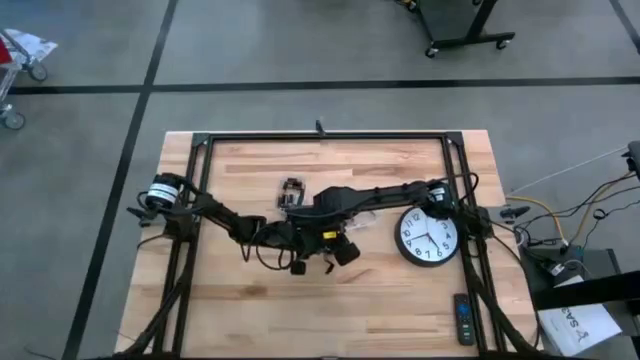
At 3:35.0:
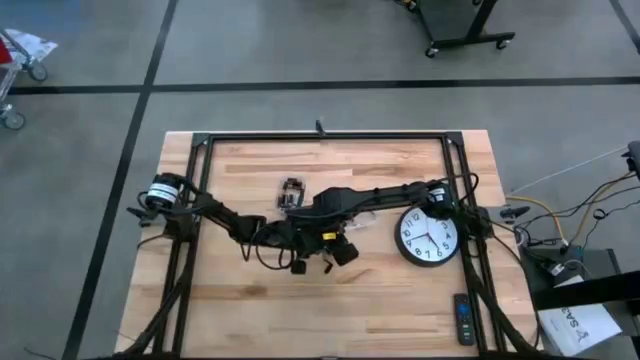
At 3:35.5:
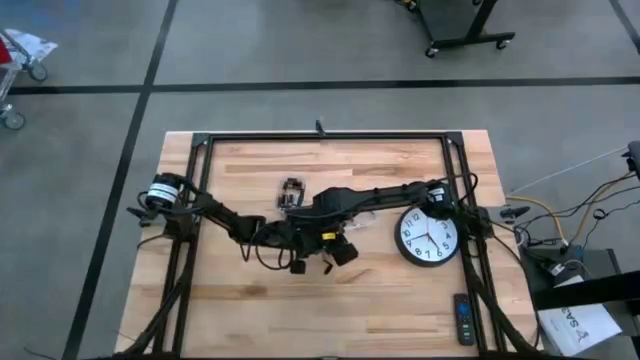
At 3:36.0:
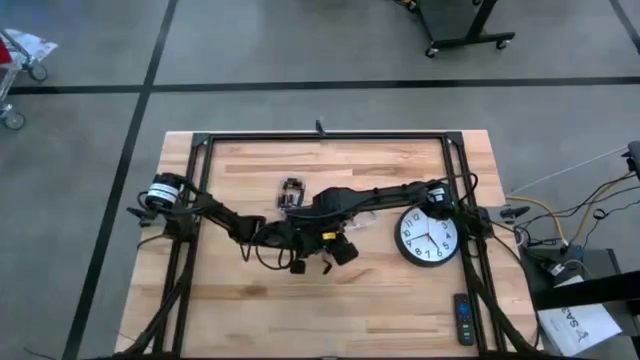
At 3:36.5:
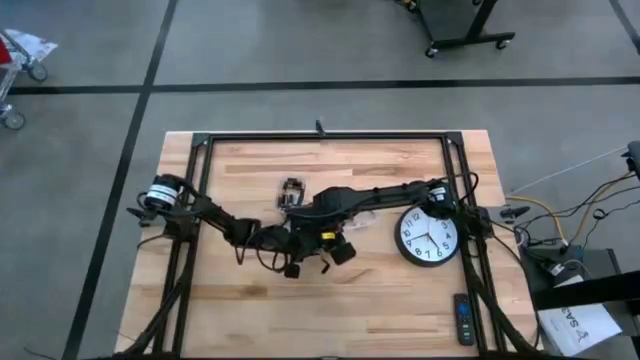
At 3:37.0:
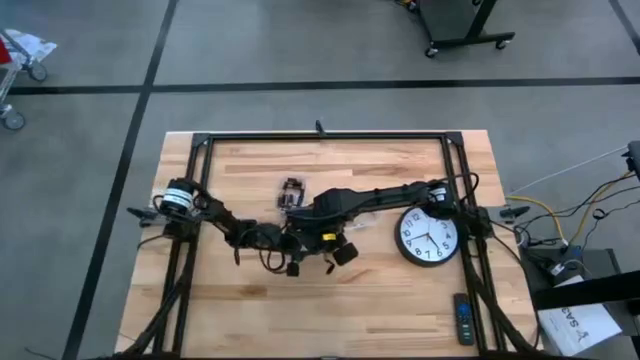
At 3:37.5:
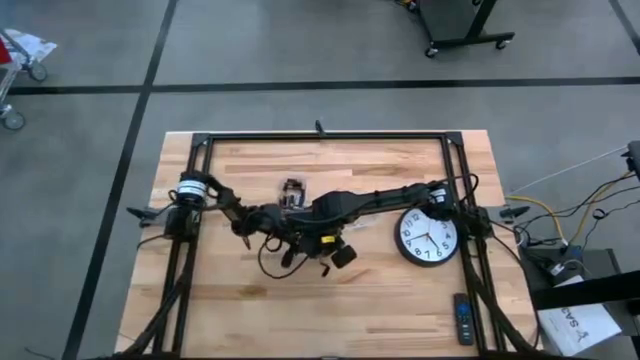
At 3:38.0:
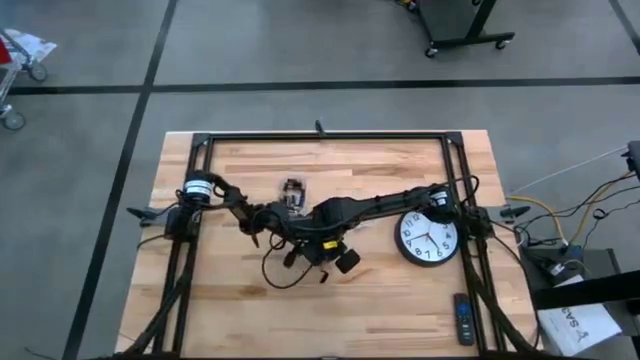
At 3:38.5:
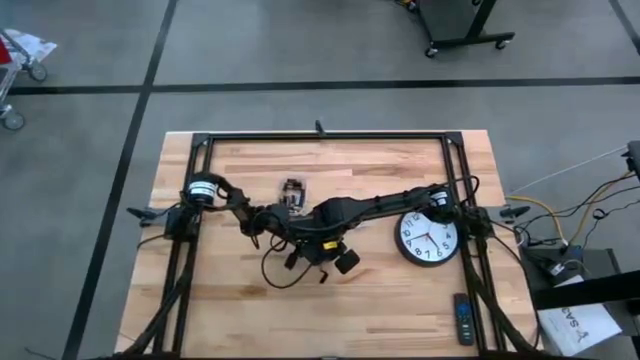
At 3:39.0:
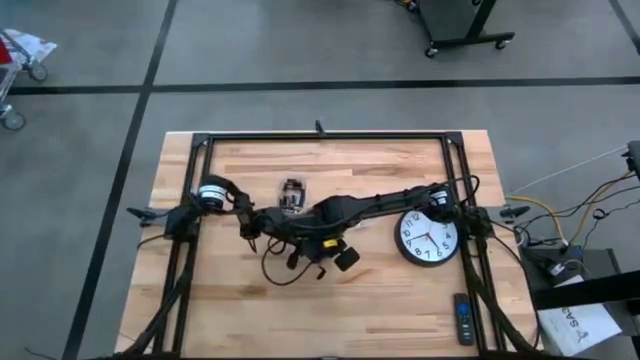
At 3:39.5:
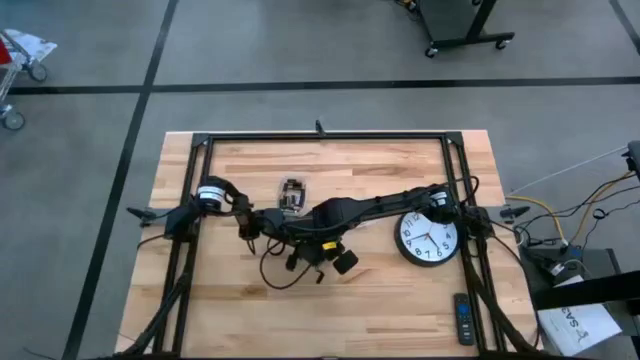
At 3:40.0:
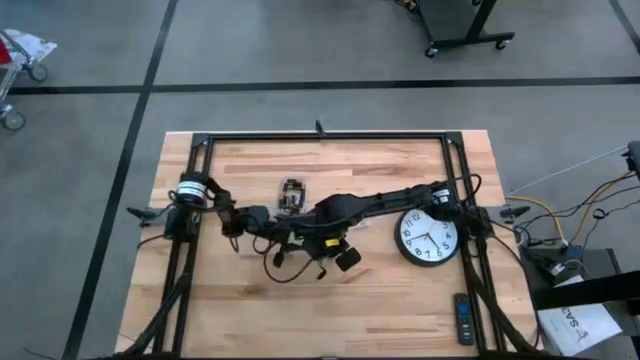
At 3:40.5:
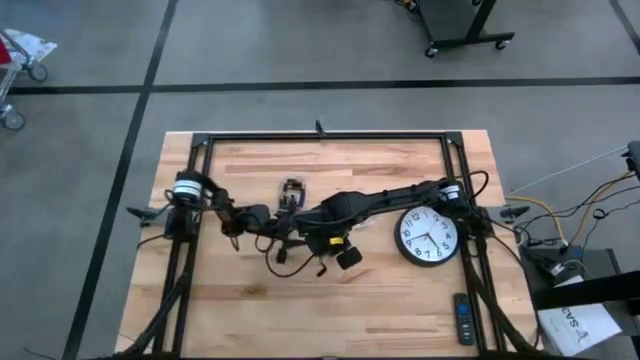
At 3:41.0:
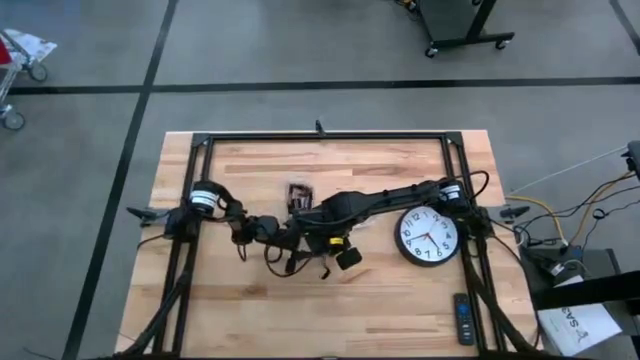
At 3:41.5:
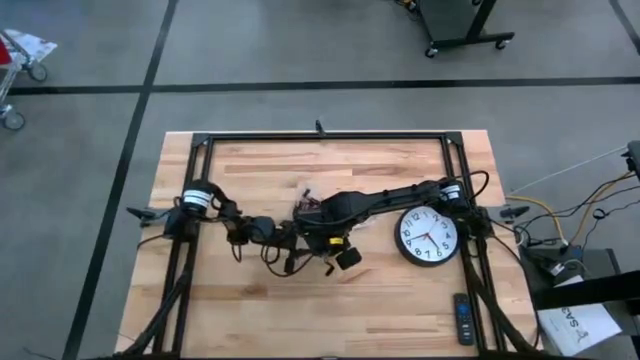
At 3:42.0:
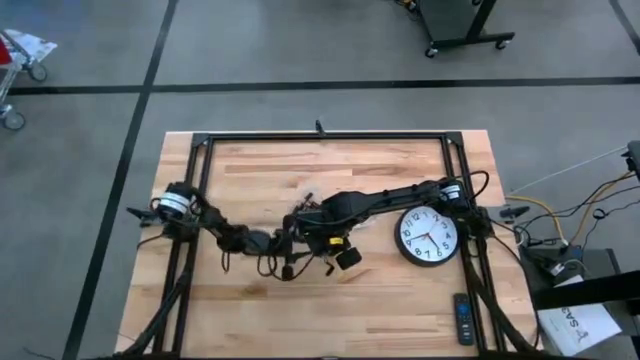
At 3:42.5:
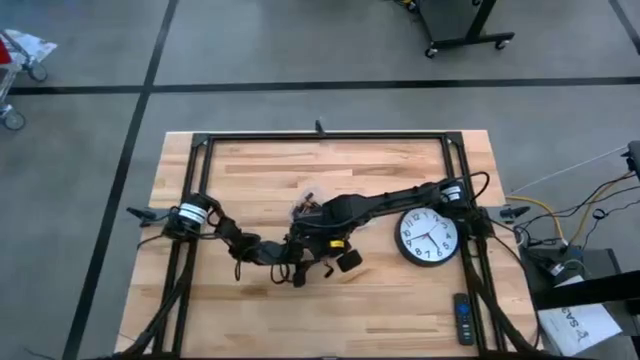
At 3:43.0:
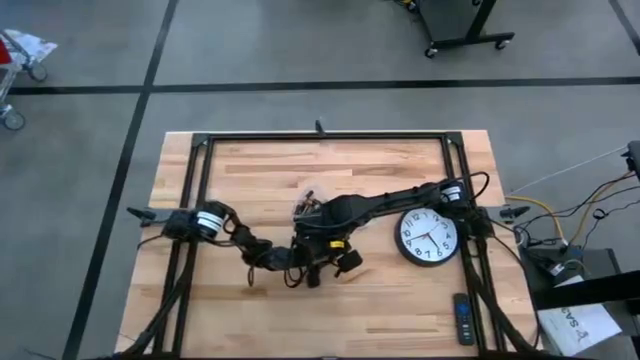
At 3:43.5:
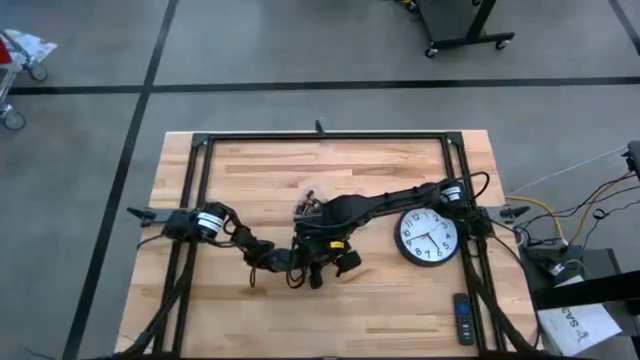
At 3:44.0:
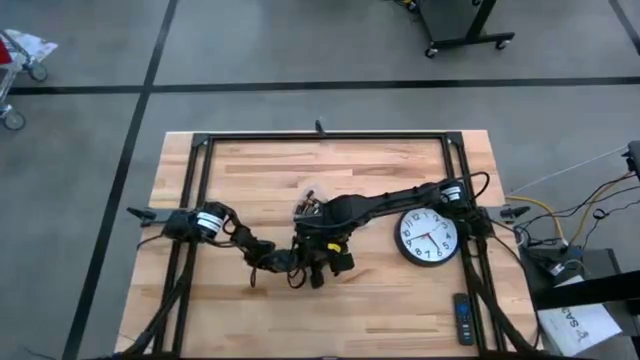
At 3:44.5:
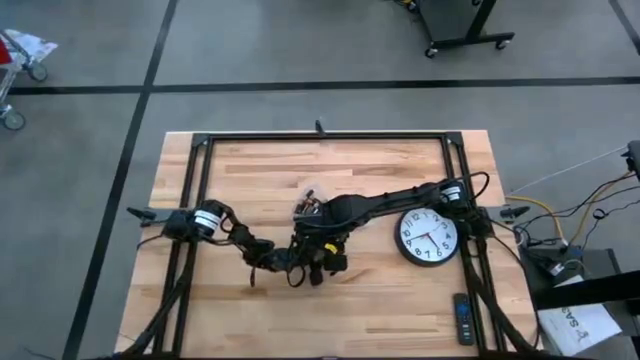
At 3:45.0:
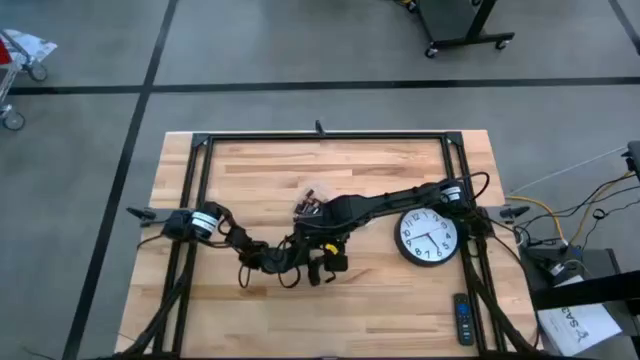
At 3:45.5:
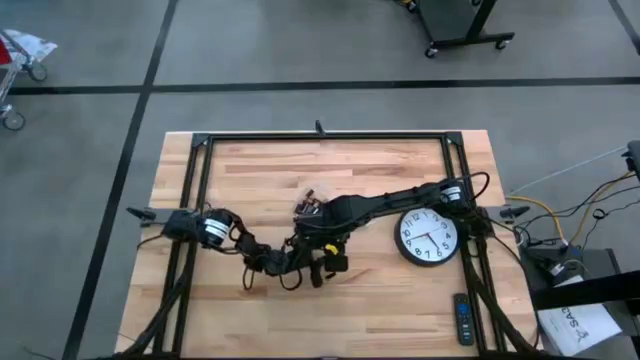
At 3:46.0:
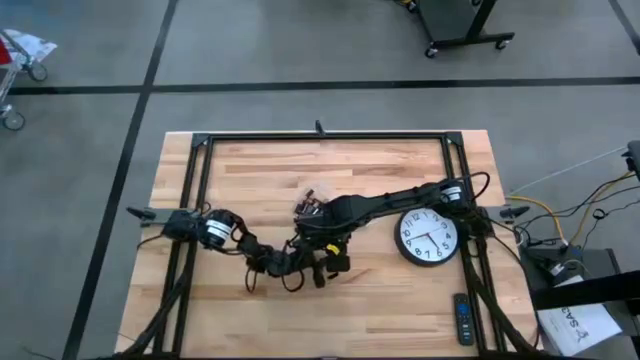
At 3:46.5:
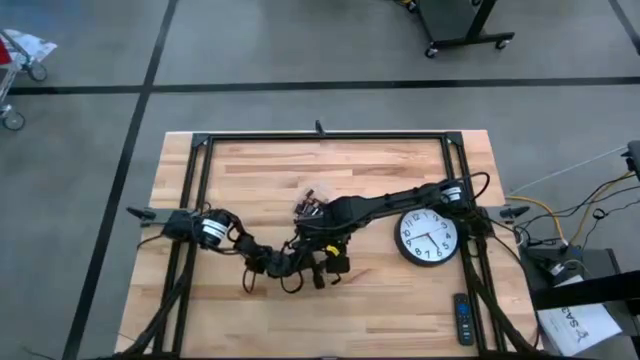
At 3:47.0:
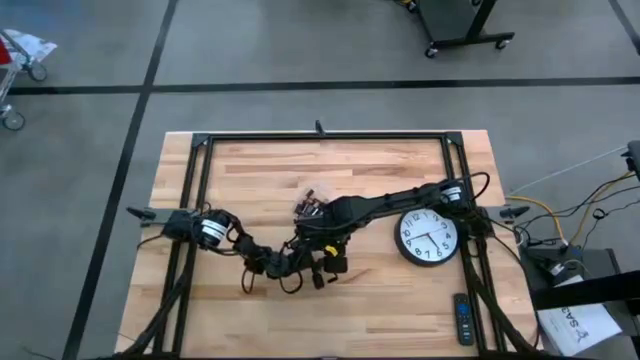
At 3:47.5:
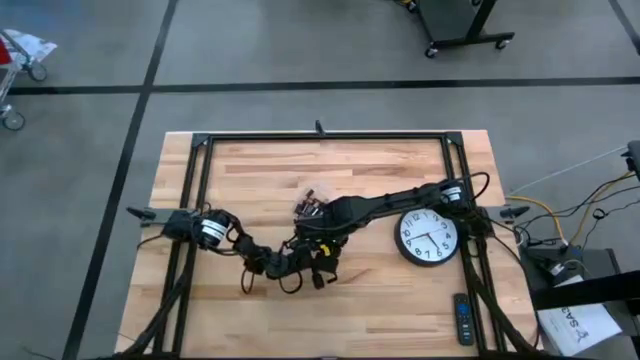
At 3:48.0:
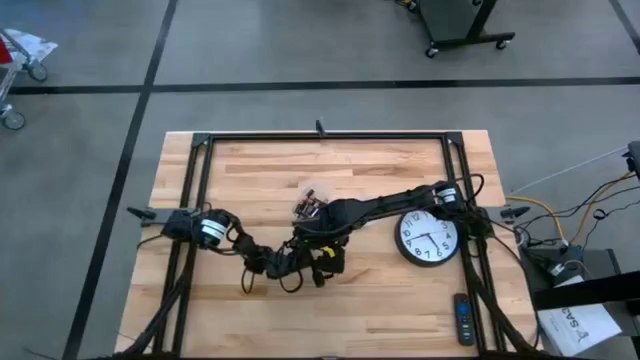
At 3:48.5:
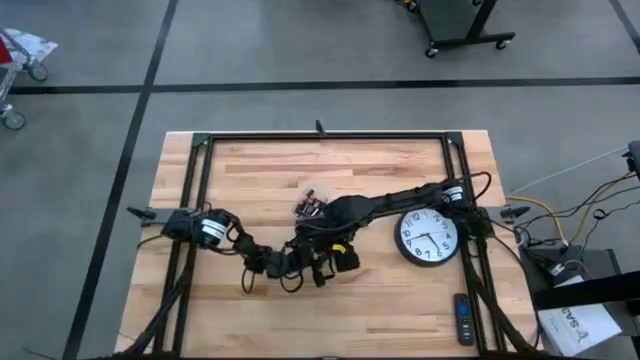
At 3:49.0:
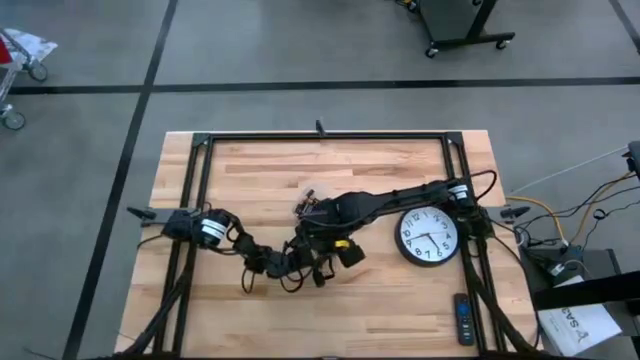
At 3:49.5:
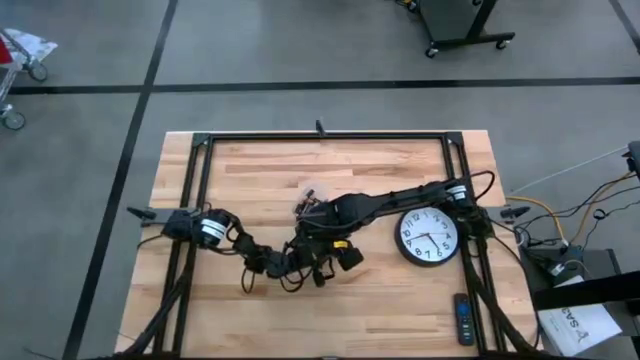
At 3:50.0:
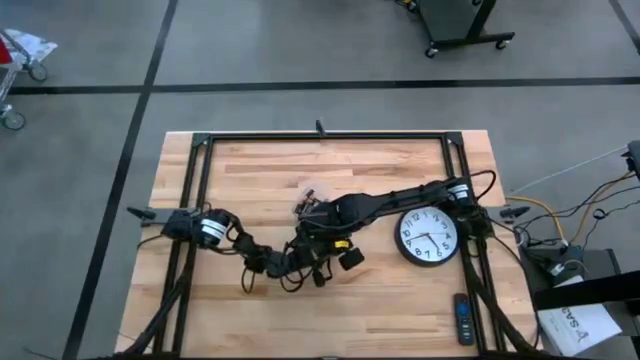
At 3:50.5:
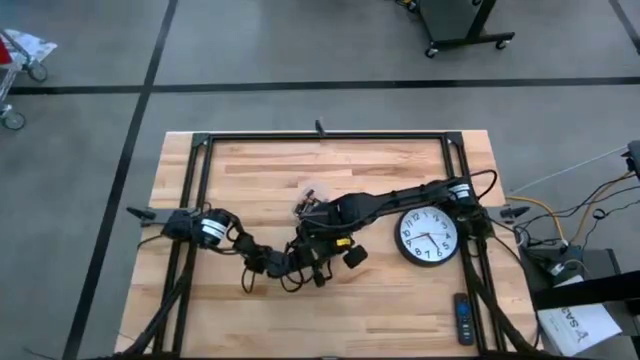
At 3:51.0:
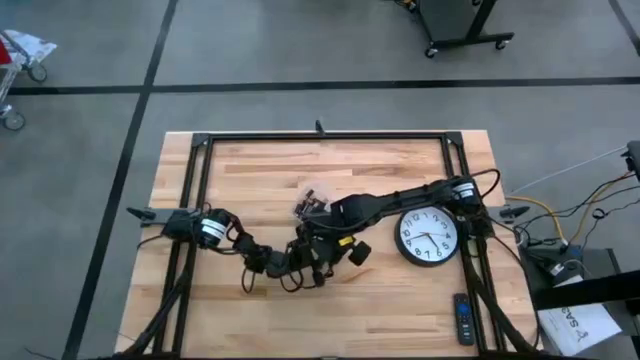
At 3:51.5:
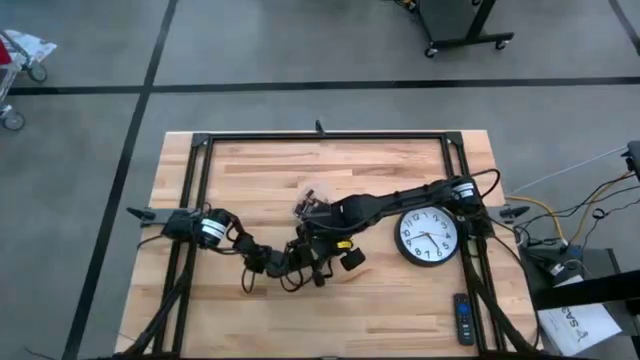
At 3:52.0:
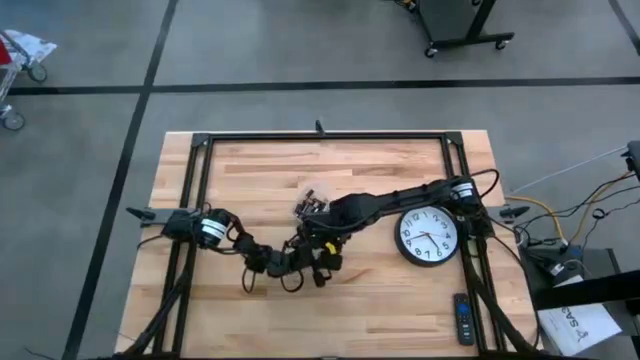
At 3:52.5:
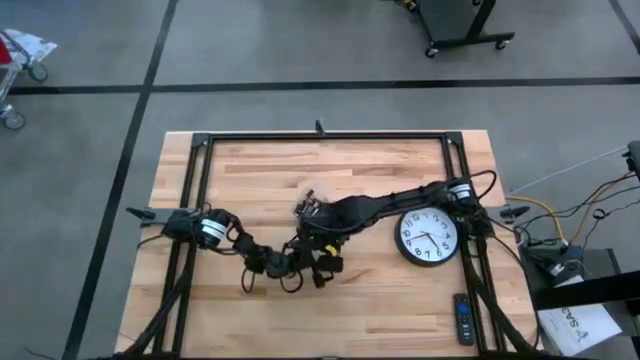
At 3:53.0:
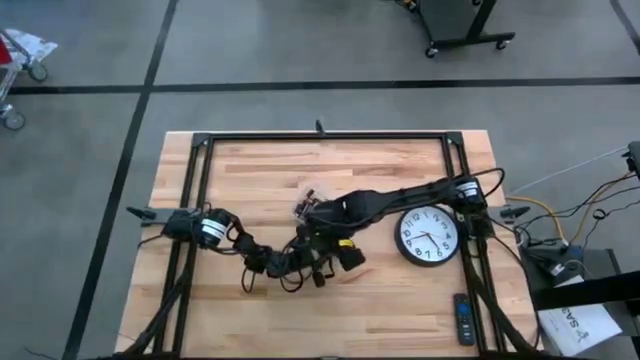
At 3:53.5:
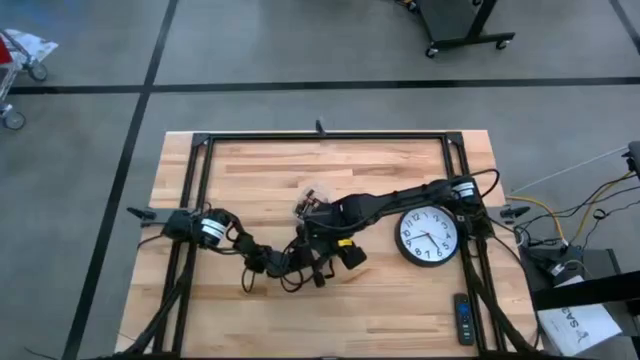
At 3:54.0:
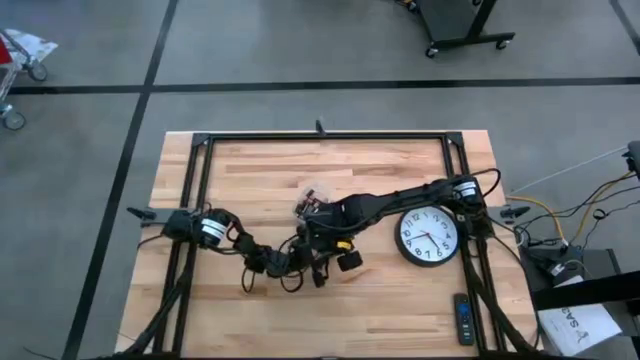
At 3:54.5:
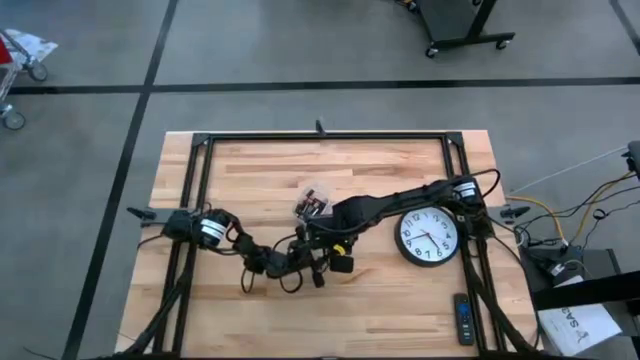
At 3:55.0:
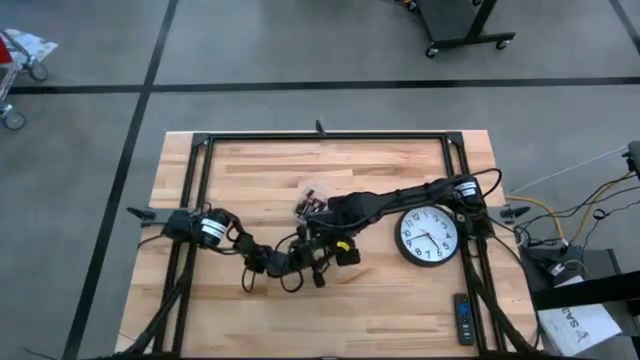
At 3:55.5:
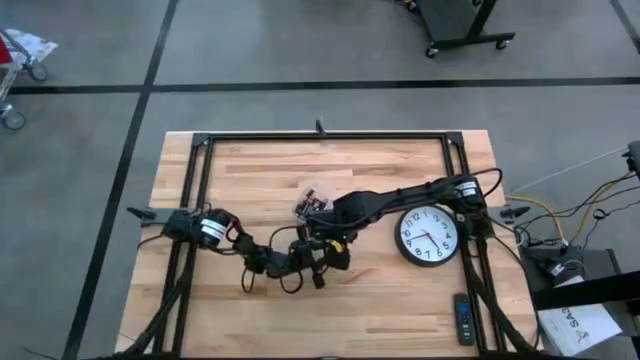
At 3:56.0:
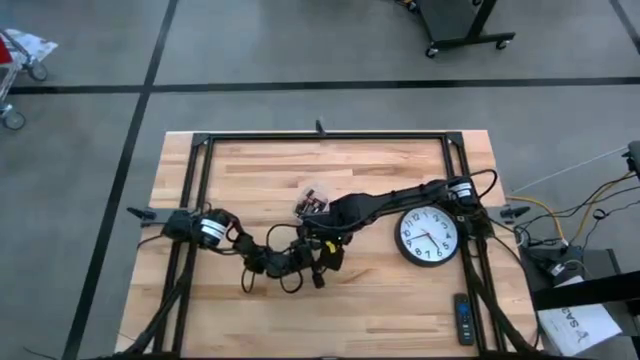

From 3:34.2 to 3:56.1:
Task: Insert battery
Close the black flashlight cover
